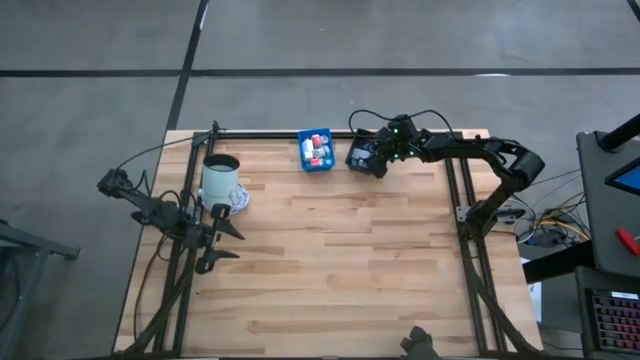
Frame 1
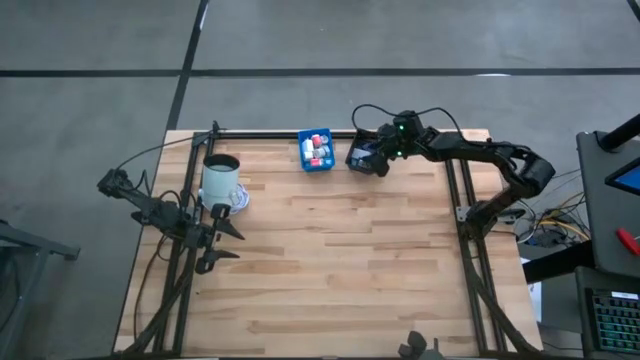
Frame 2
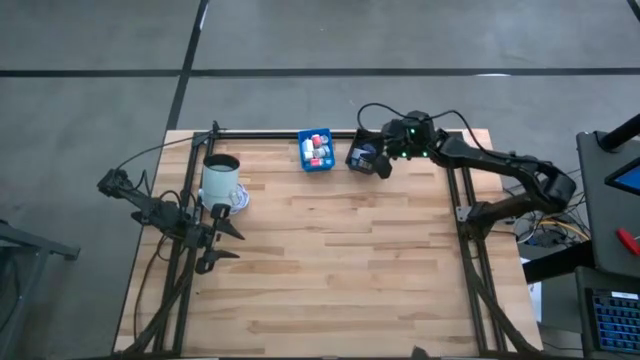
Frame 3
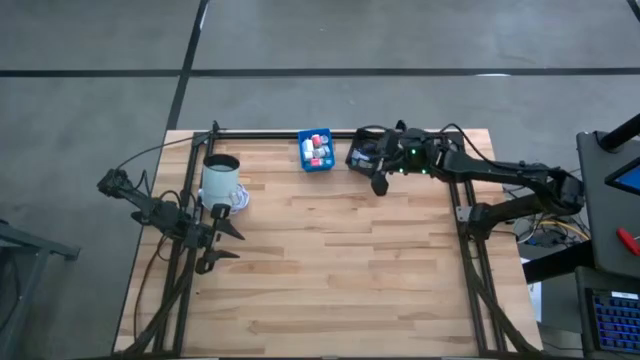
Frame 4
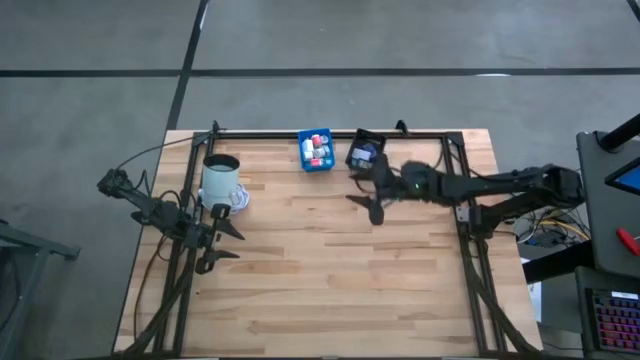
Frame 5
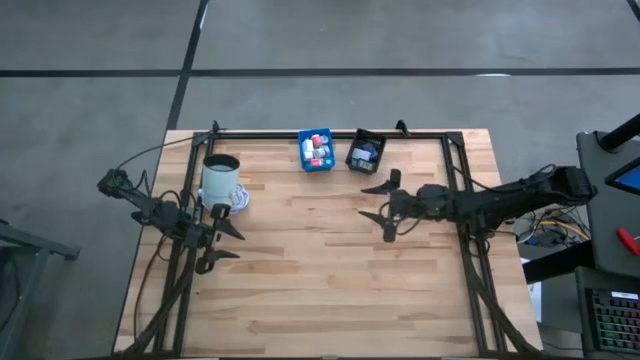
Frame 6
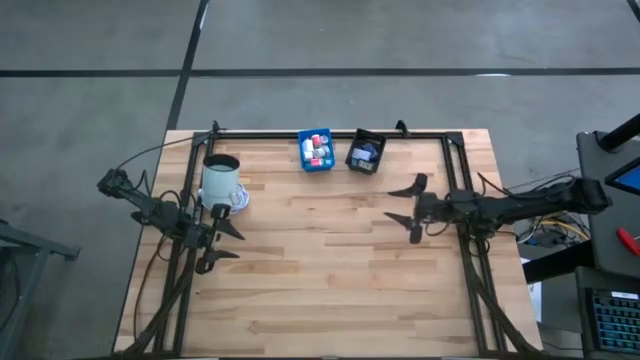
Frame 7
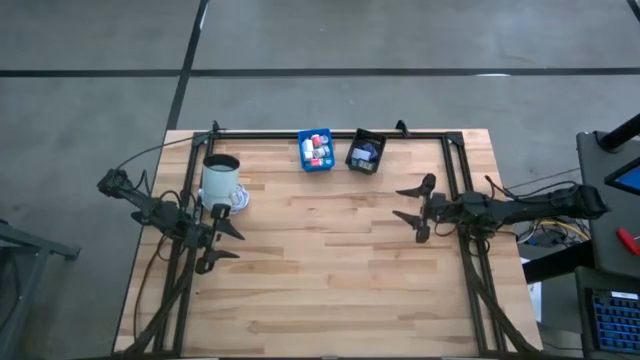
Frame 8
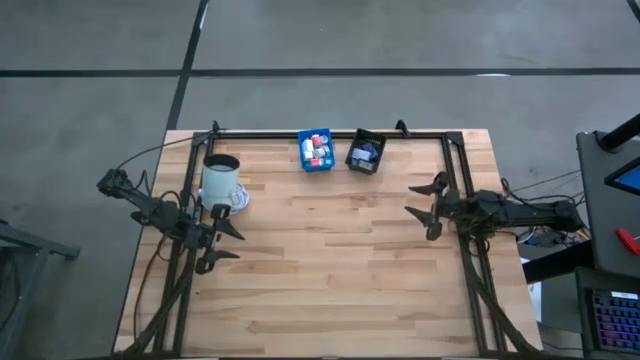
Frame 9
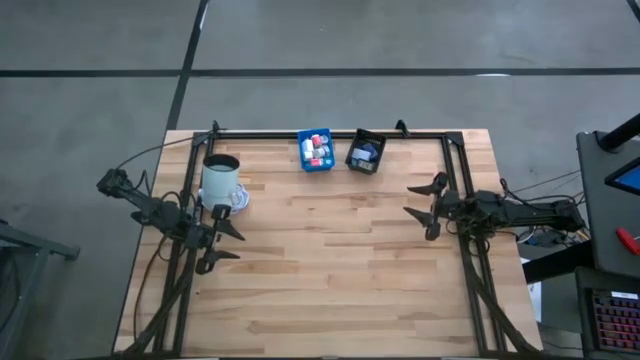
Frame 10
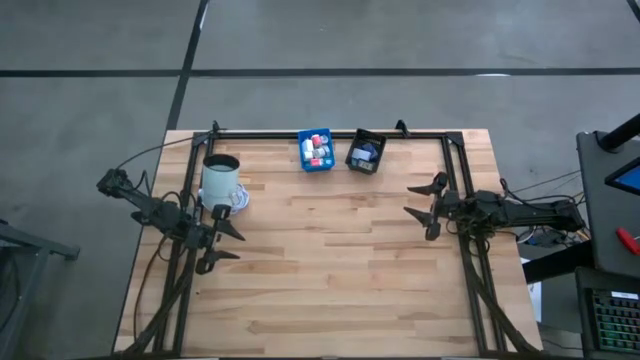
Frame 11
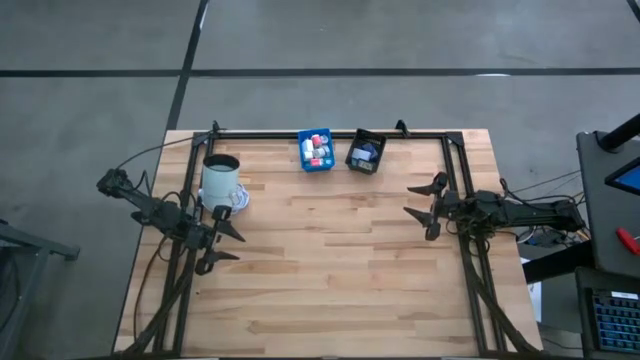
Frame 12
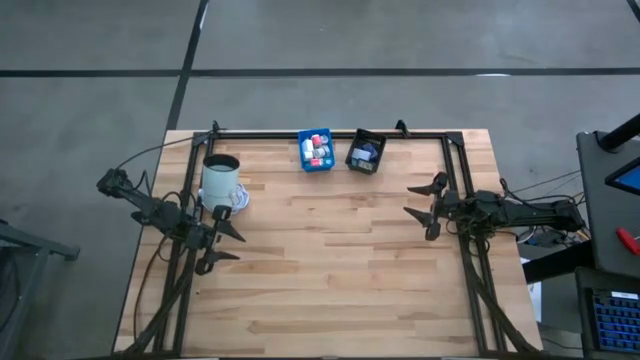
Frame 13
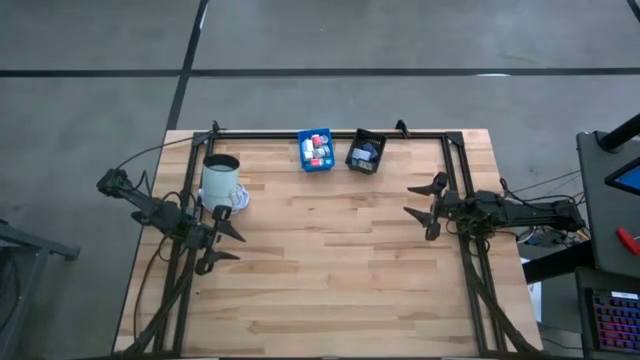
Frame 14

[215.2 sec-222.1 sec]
Task: Pick & Place Office items
Return to Home Position

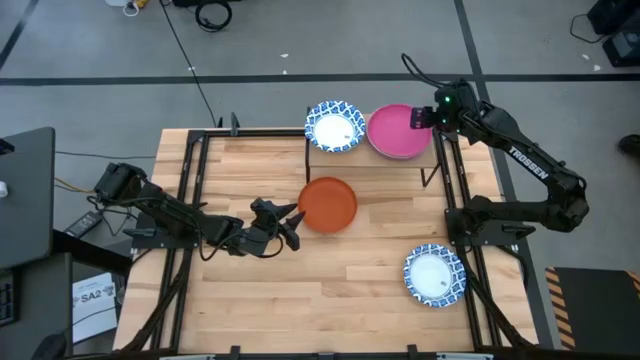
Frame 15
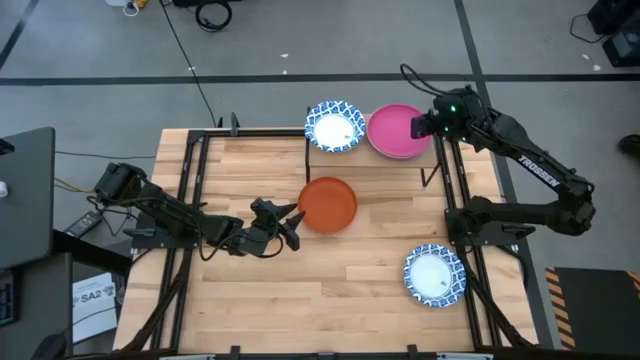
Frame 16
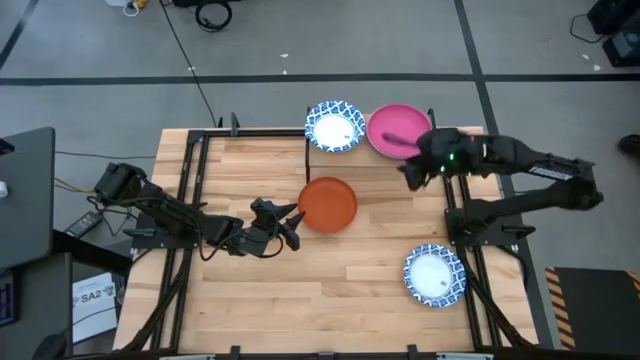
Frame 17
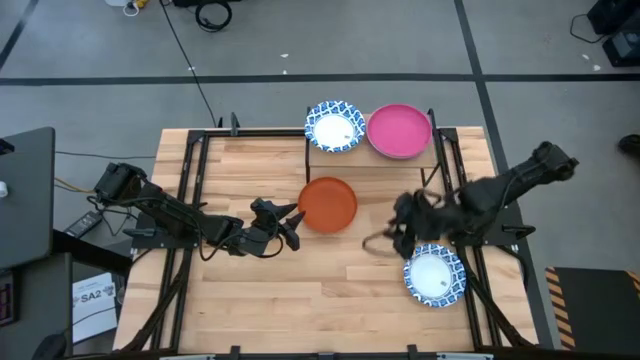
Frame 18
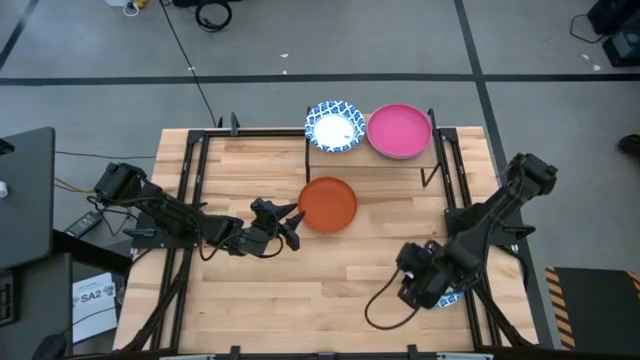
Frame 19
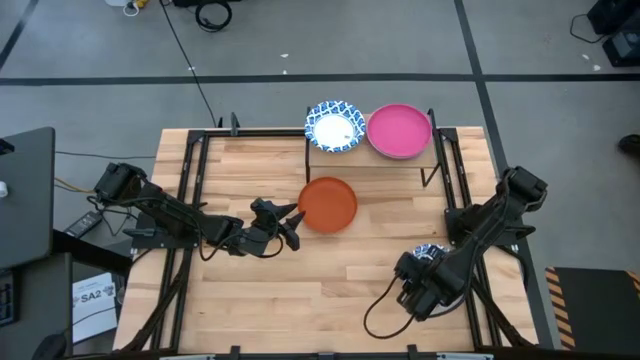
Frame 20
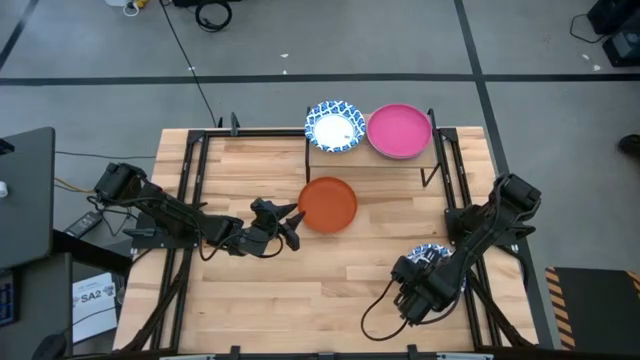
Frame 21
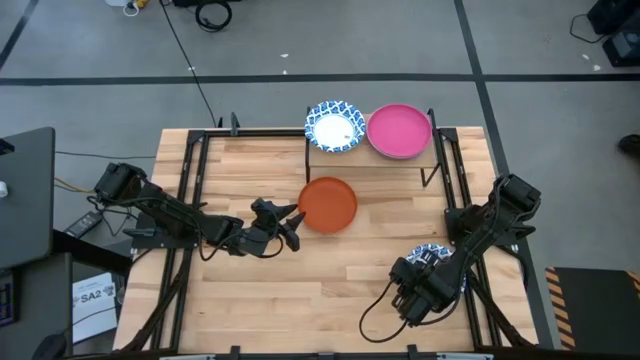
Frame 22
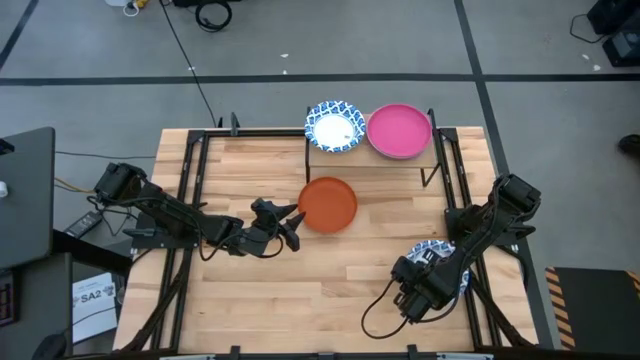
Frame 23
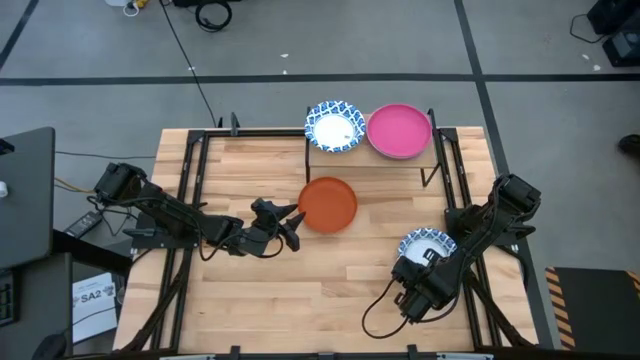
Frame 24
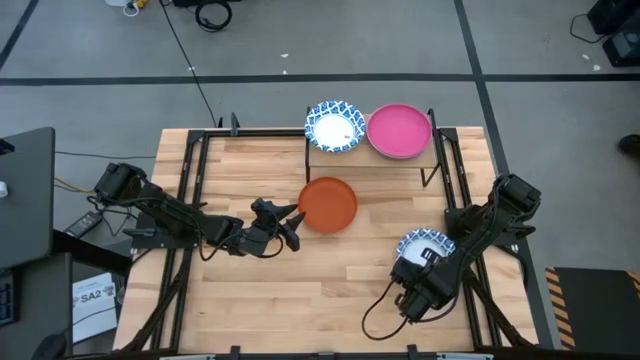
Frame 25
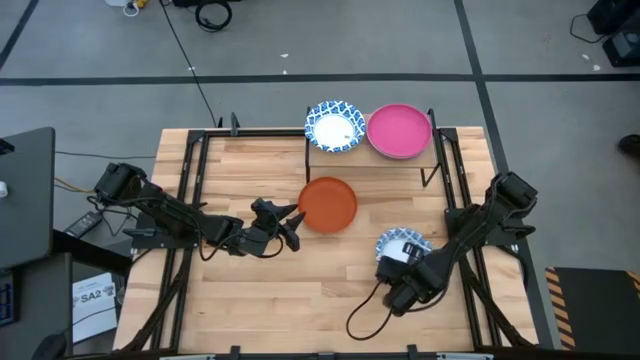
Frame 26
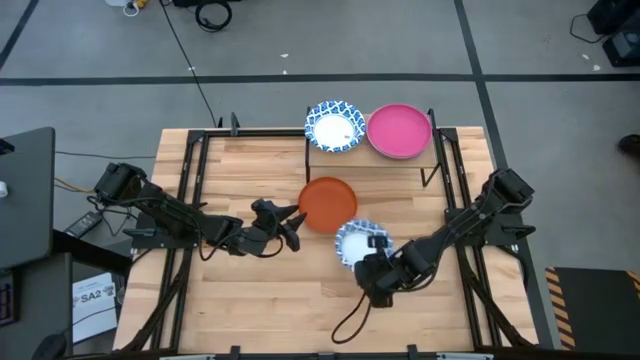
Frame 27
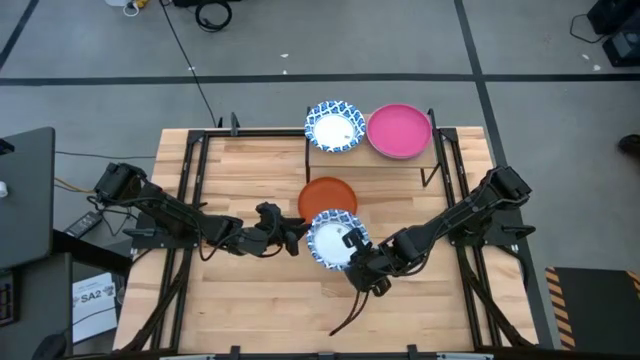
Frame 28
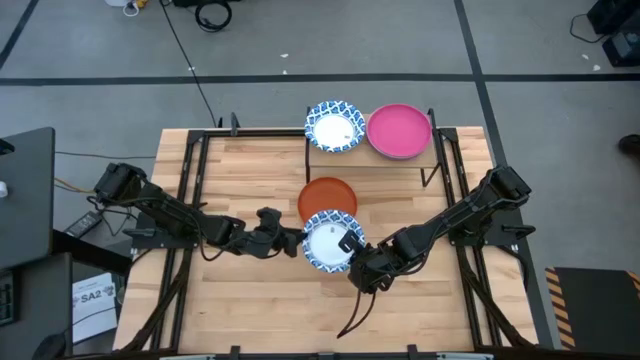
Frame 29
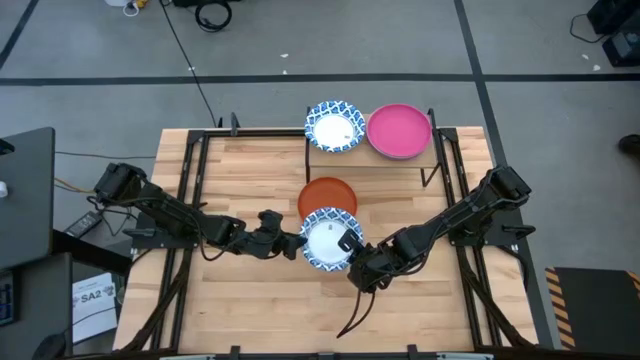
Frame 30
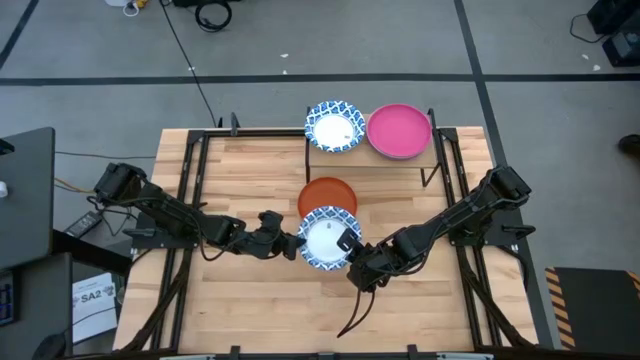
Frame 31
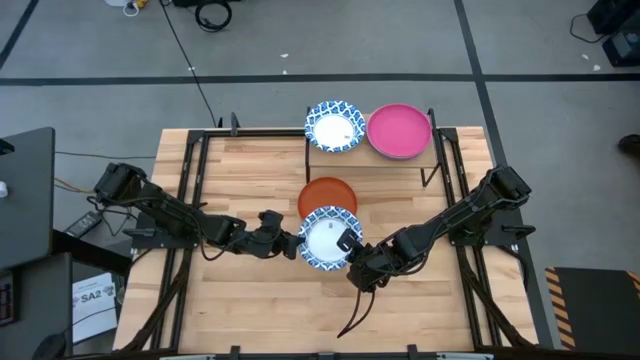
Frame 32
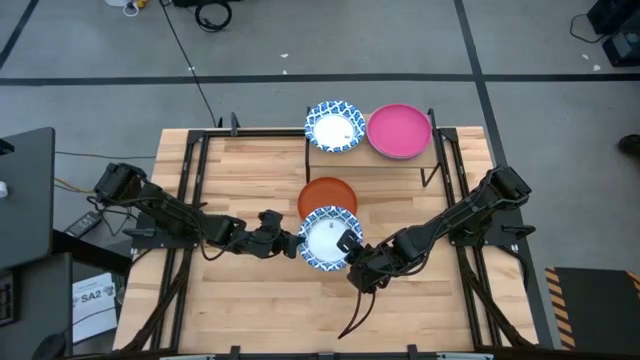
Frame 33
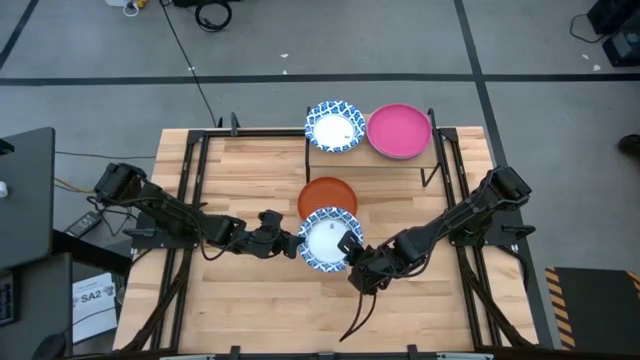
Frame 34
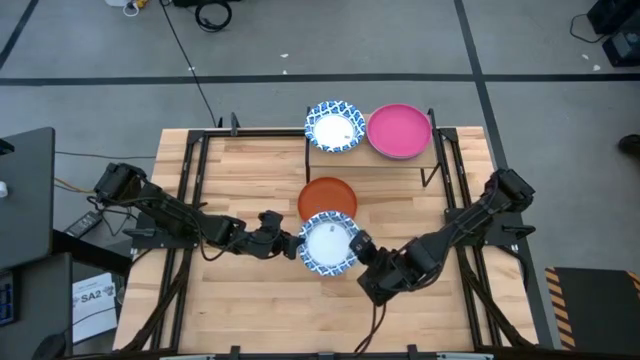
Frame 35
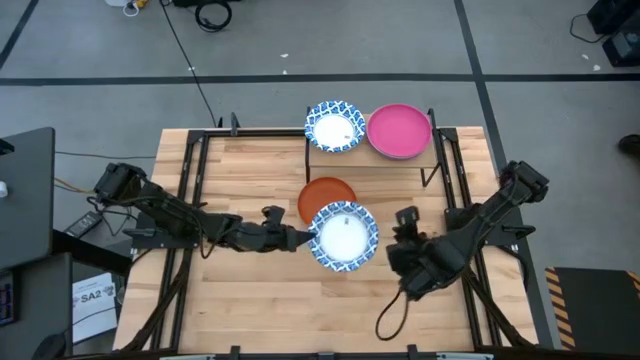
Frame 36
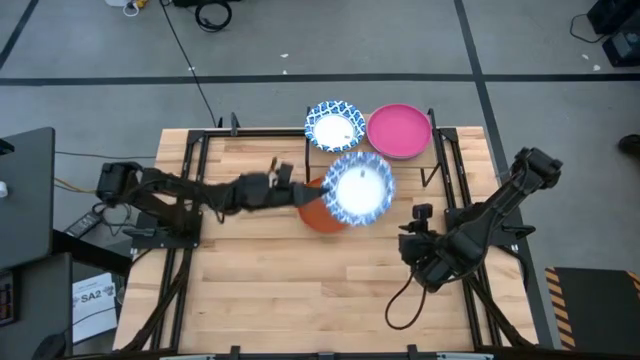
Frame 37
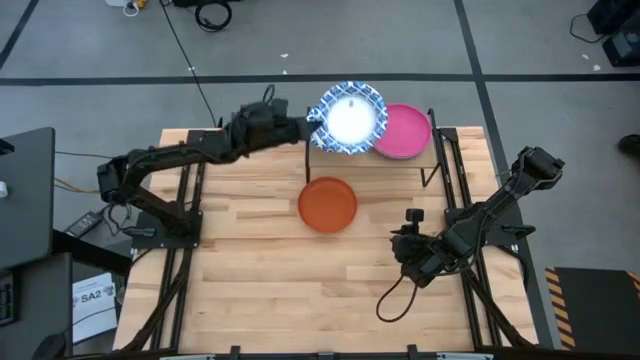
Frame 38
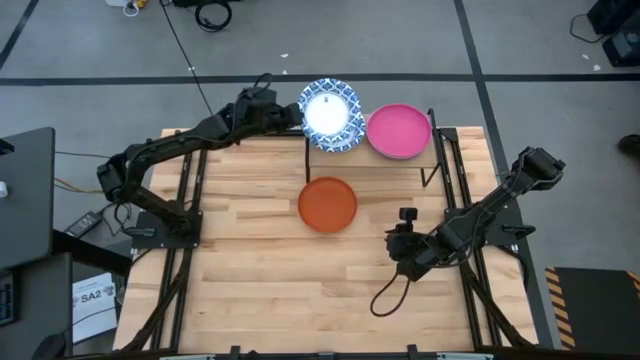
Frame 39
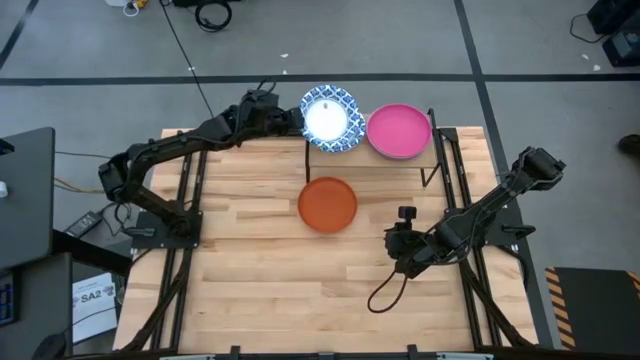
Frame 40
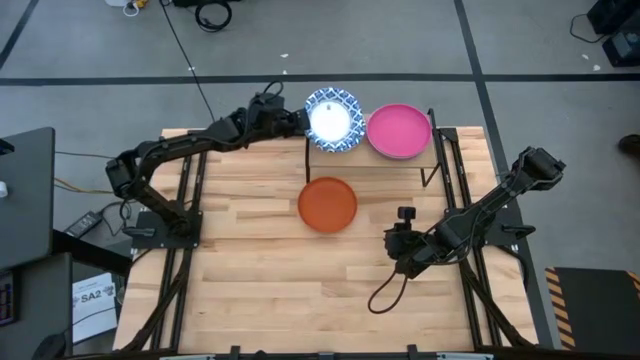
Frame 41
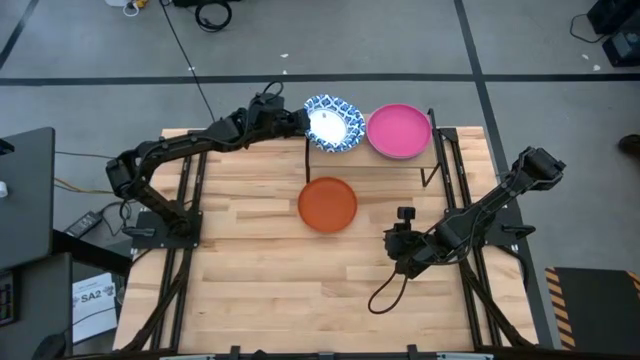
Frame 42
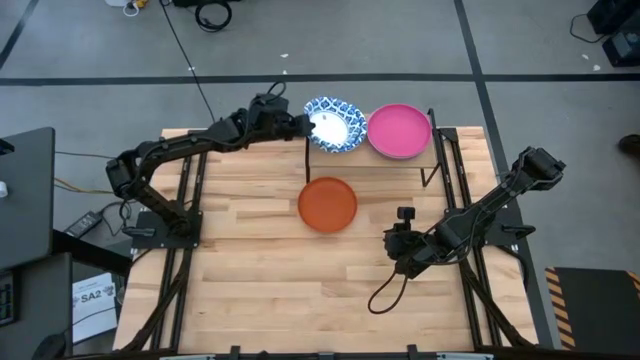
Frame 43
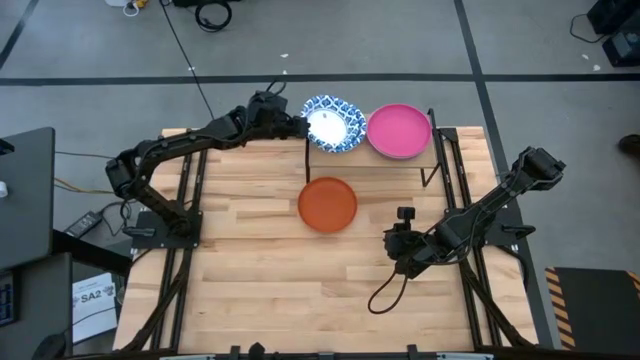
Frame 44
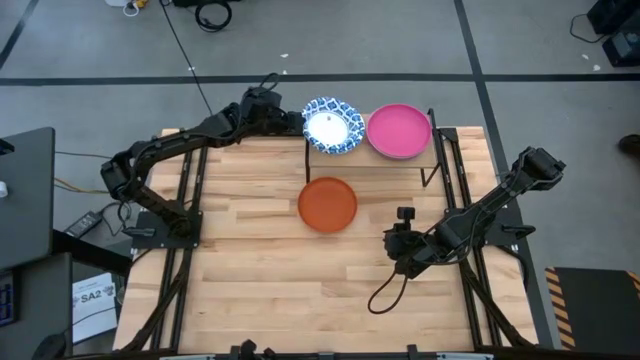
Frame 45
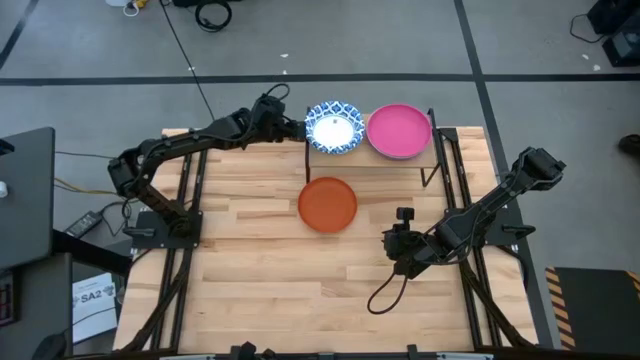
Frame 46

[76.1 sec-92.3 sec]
Task: Place and stack plates onto a shelf
Stack the white plate on top of the white plate on the shelf
